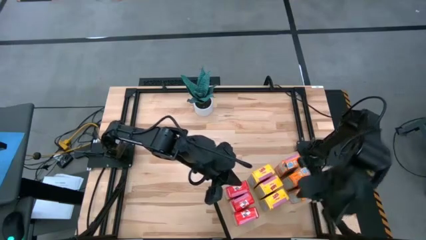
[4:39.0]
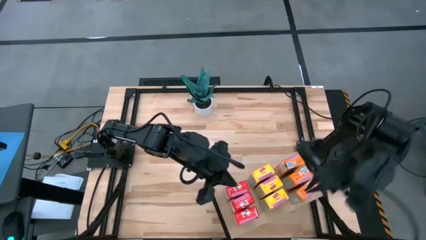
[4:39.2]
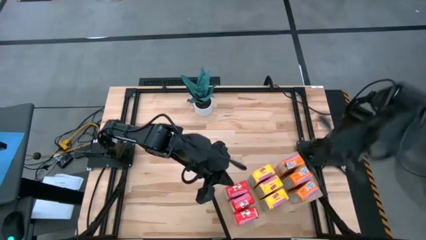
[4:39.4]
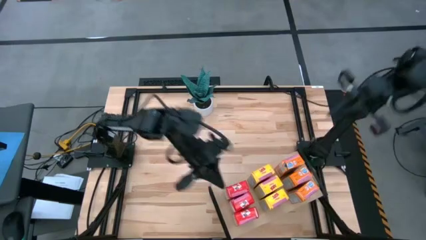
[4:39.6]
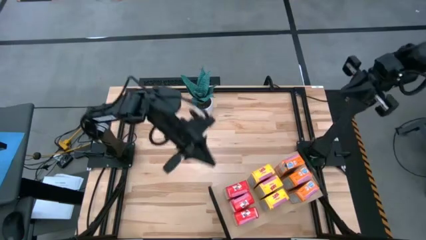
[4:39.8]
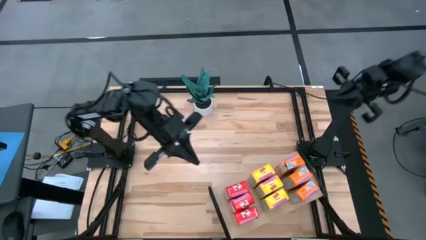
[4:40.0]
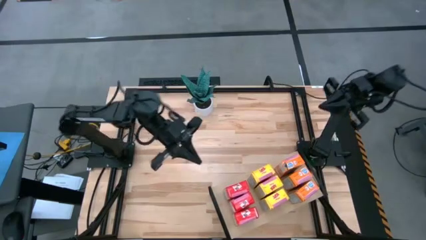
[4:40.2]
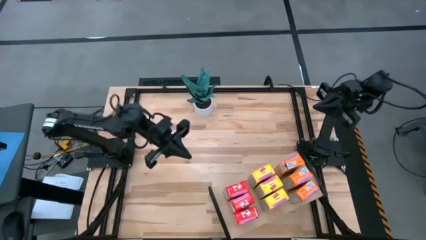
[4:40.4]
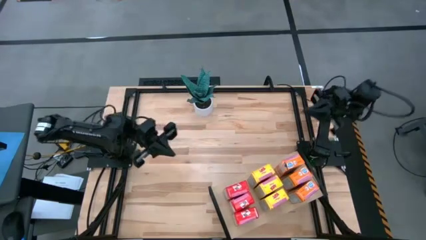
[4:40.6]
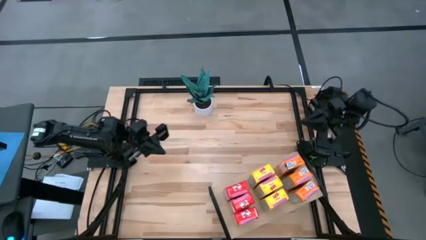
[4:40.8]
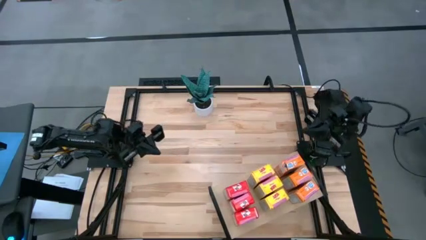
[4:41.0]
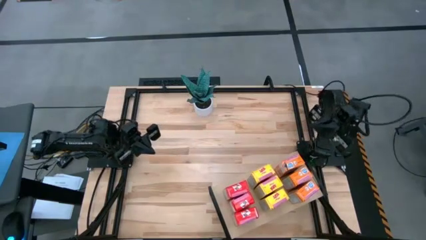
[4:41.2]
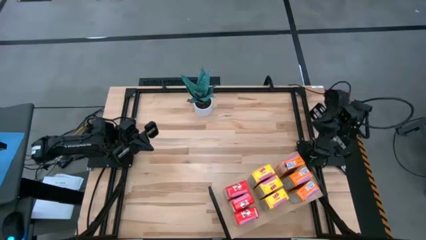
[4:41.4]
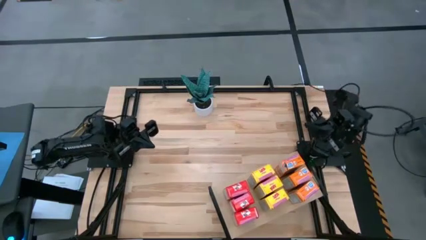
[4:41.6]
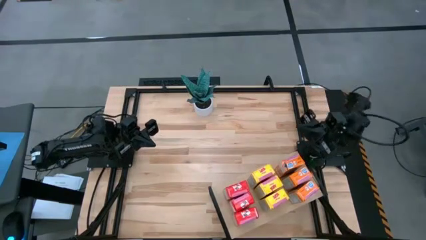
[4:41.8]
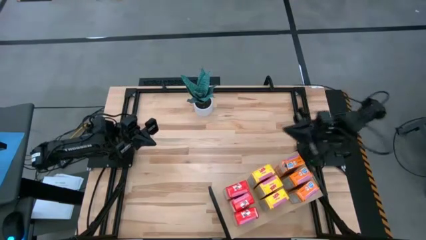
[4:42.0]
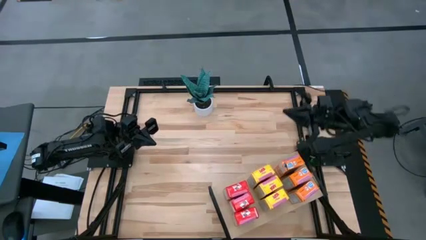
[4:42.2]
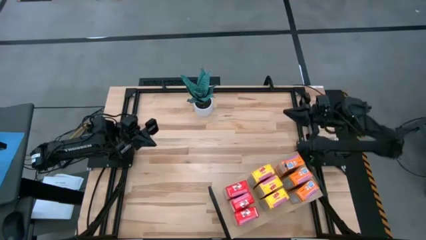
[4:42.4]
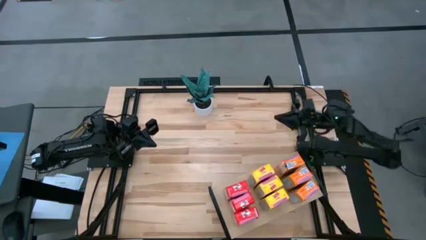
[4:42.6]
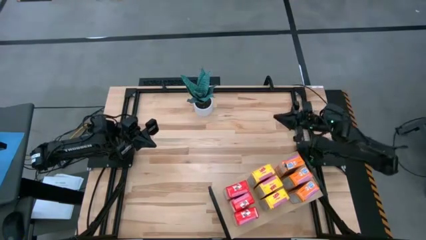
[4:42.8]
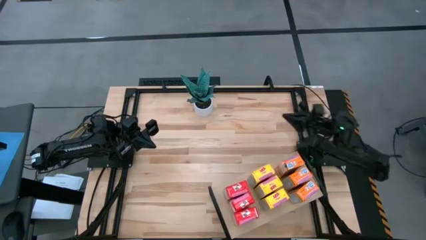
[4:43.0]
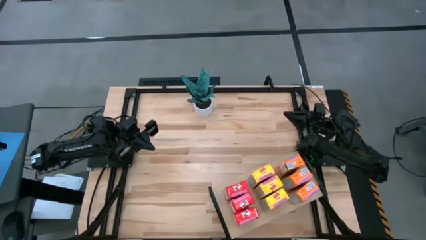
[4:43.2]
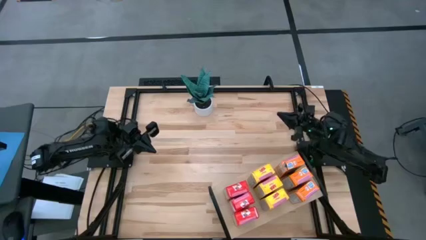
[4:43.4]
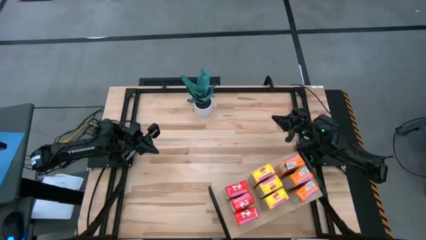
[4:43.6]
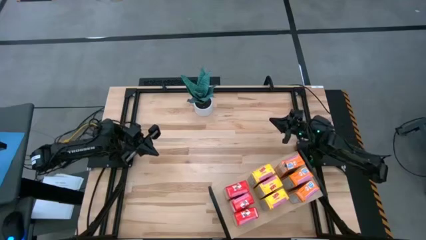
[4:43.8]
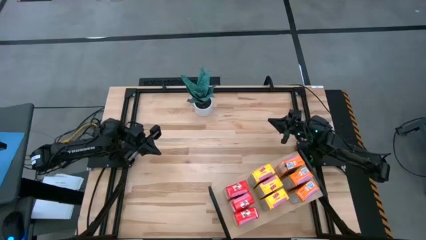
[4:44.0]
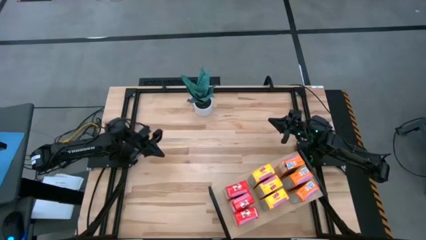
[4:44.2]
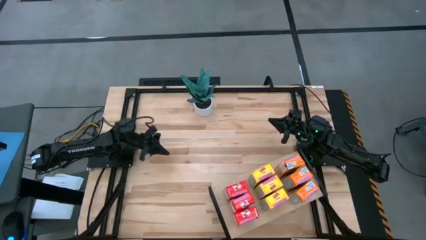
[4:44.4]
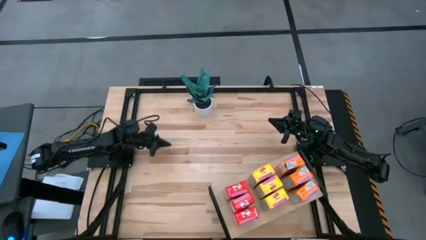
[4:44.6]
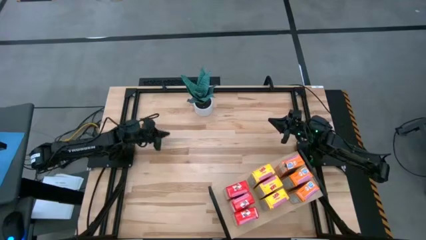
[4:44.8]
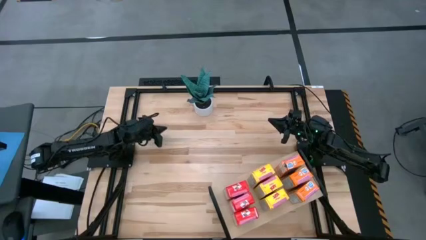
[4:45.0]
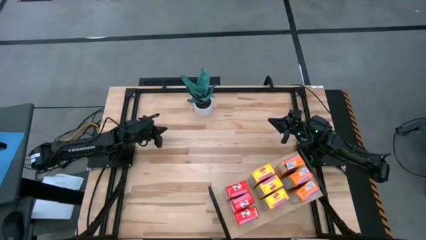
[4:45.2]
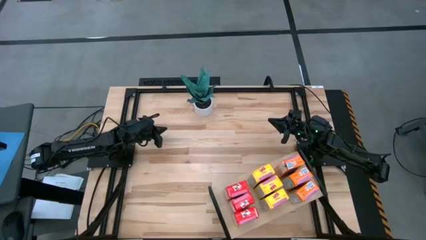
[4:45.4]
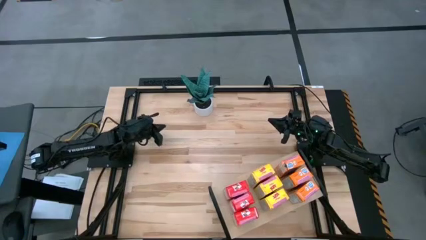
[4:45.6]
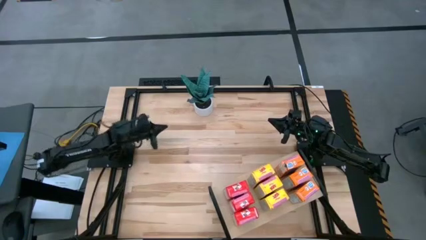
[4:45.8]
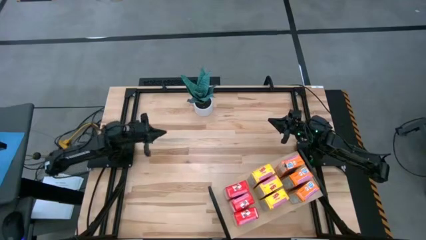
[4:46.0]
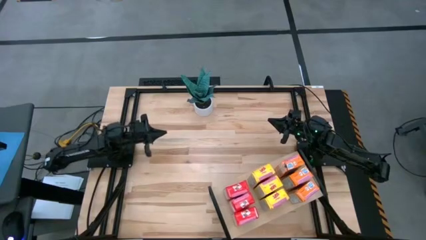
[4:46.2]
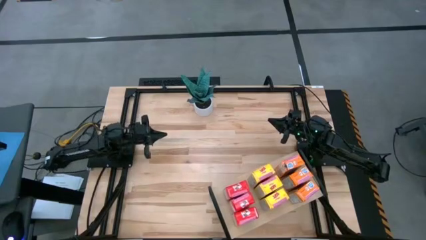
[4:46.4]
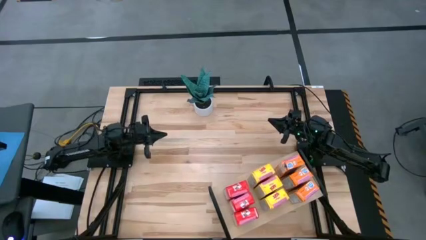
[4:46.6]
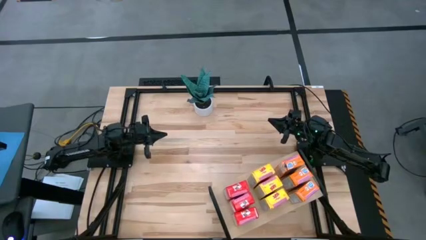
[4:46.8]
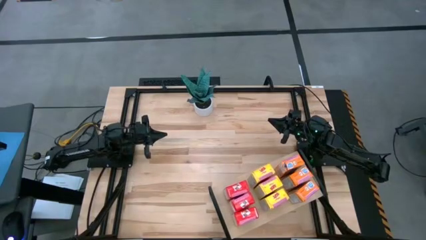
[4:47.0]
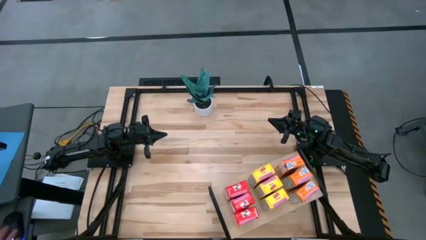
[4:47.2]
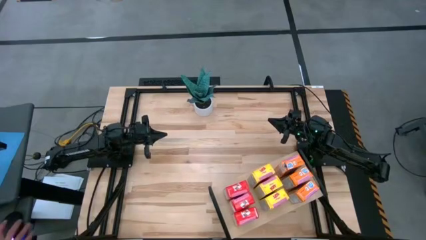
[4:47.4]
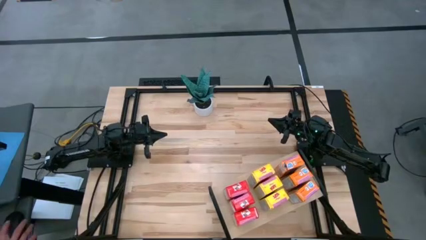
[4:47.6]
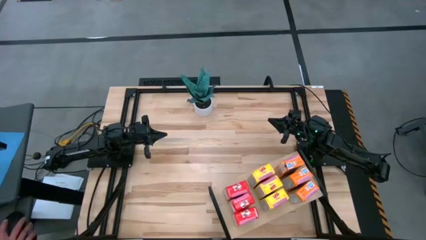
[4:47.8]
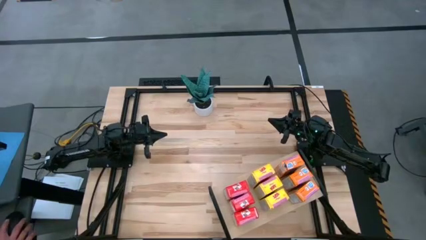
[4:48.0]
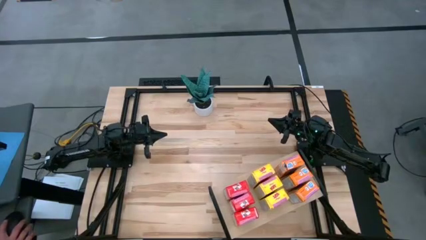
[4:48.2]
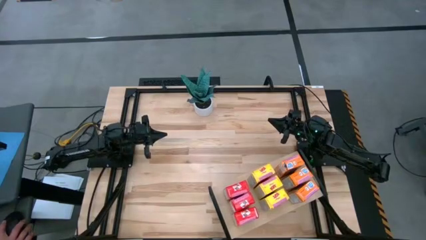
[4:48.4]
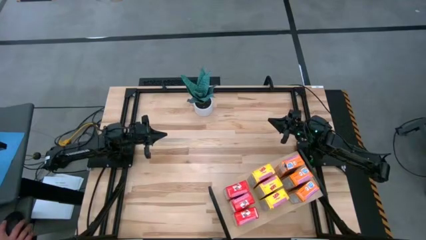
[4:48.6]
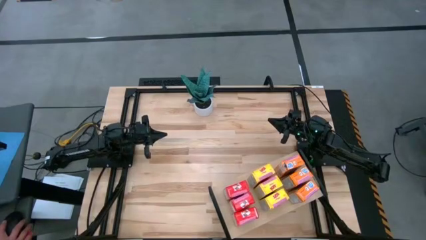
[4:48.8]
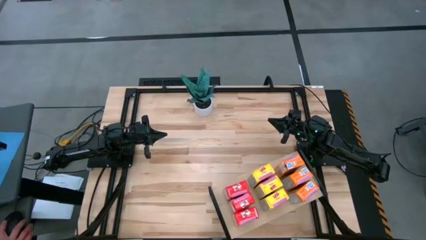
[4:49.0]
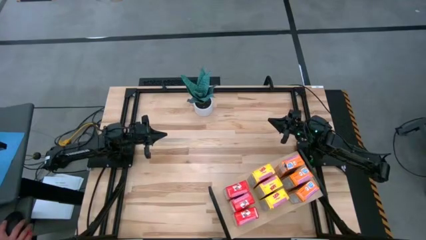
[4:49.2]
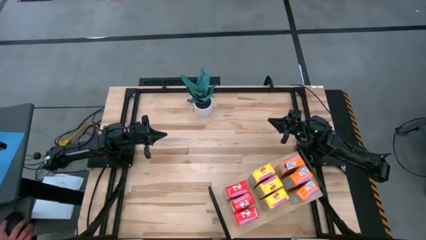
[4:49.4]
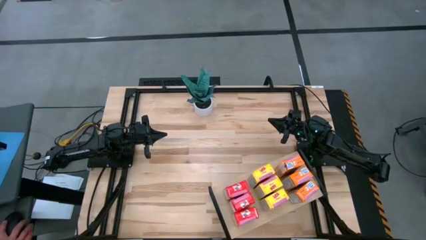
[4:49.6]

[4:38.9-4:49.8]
Task: Stack cereal on shelf
Return to Home Position
